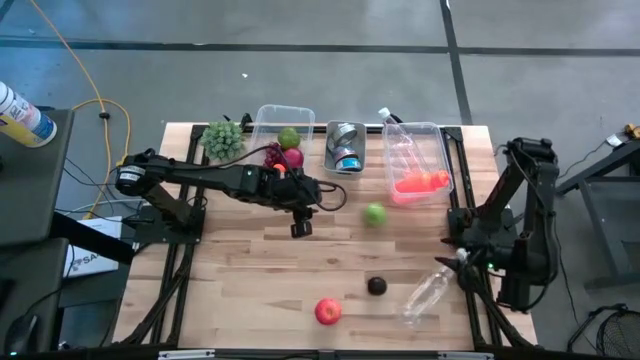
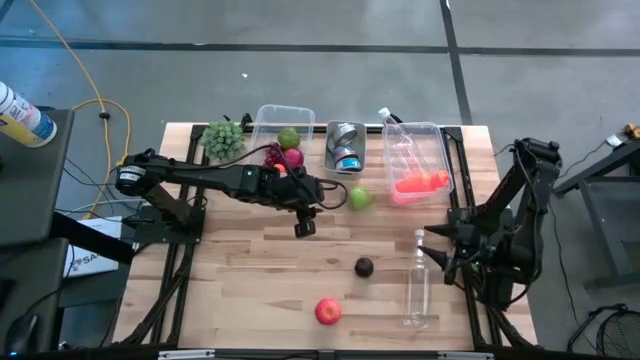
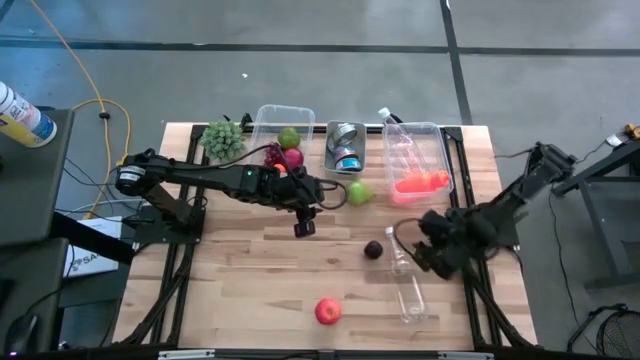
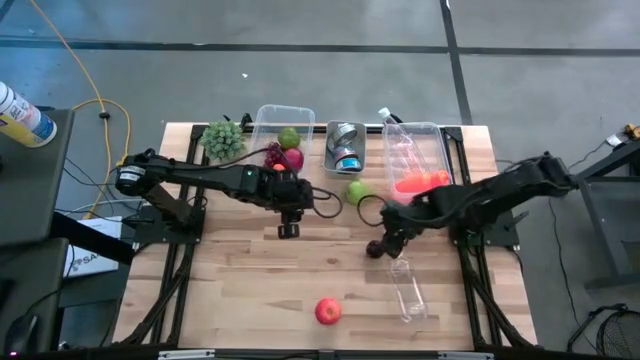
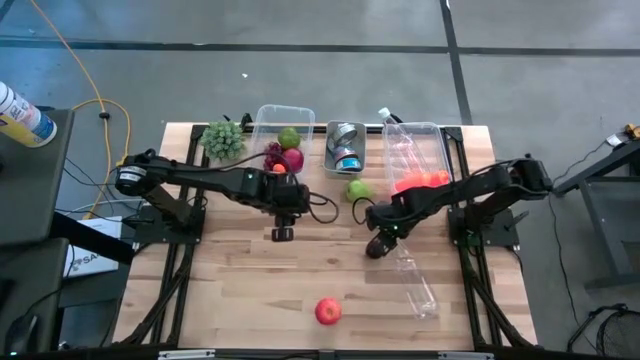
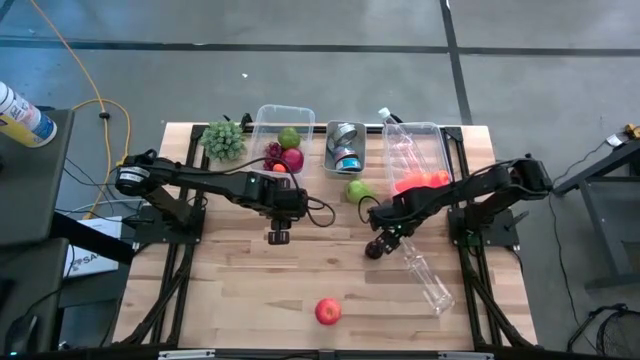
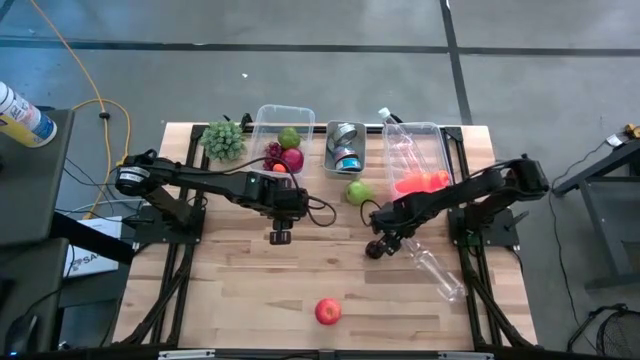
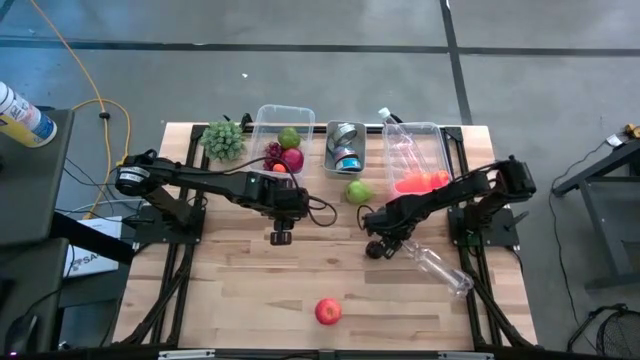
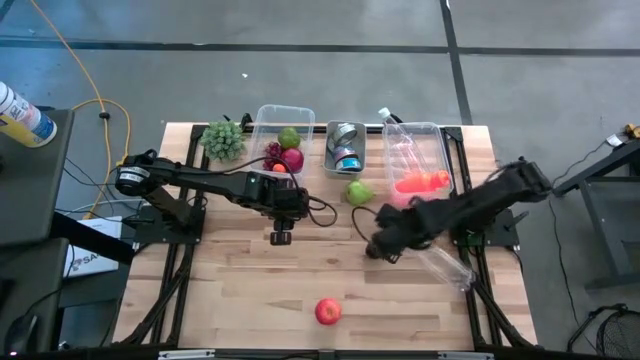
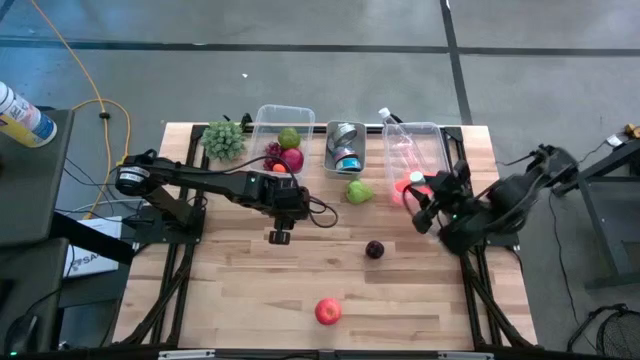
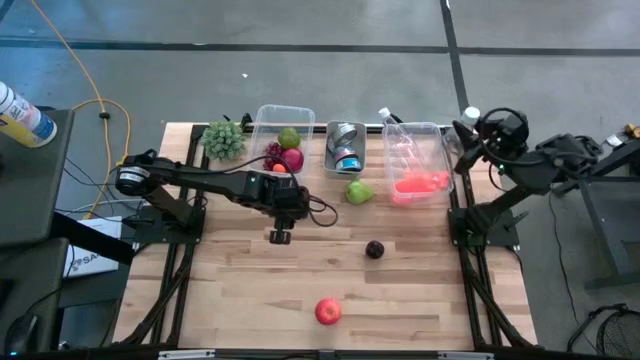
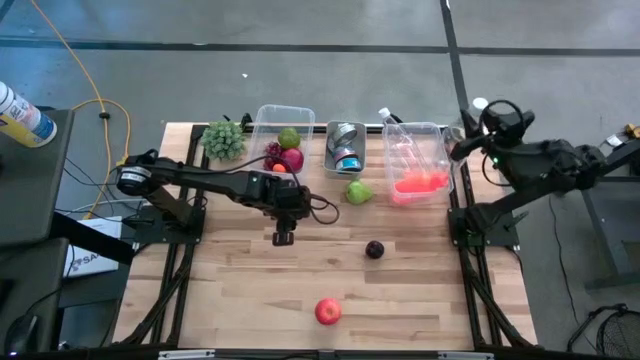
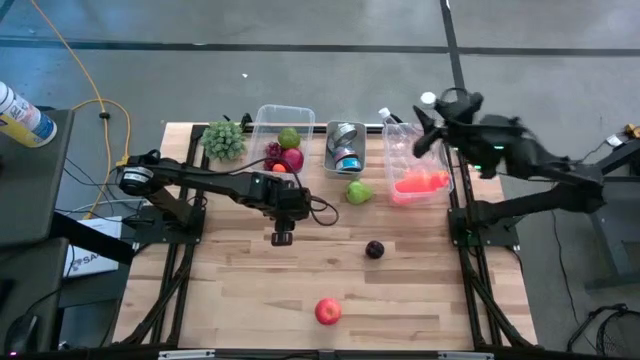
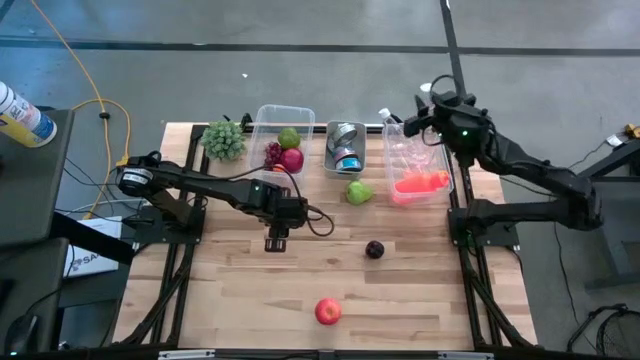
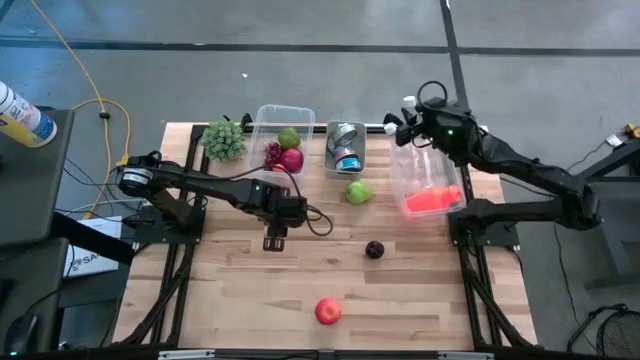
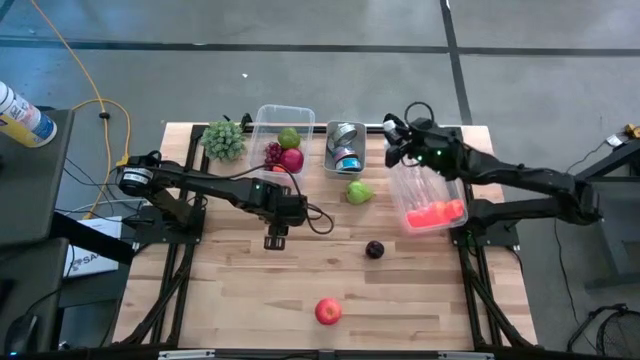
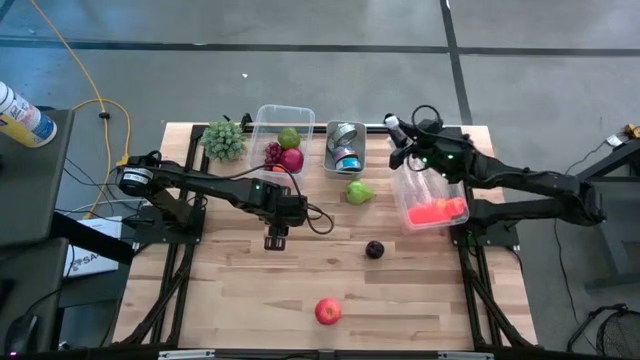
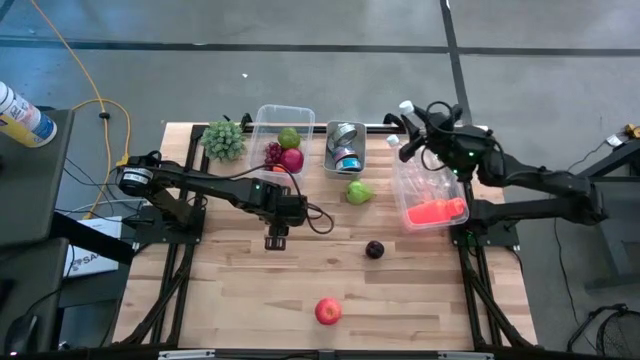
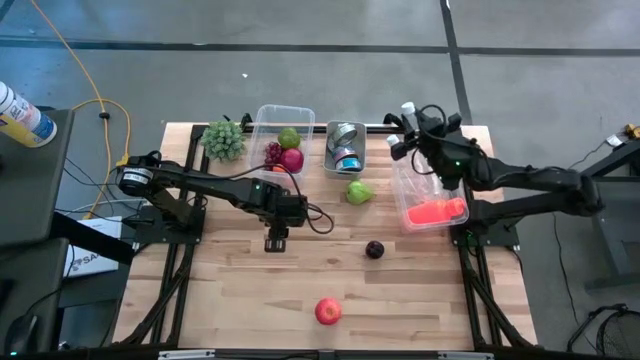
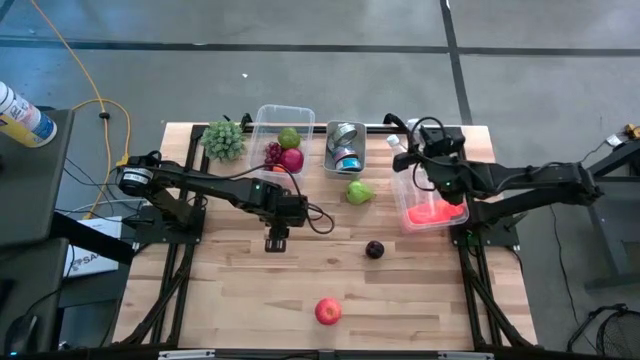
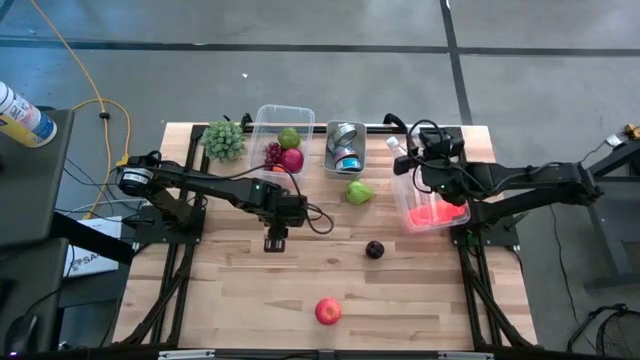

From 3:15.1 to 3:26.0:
Task: Pick & Place Food Item
Put the transparent water bottle into the right transparent bin

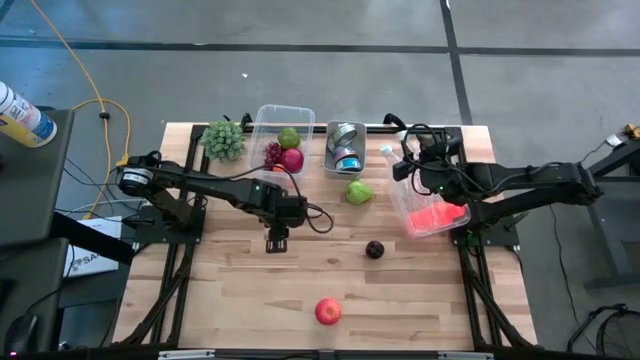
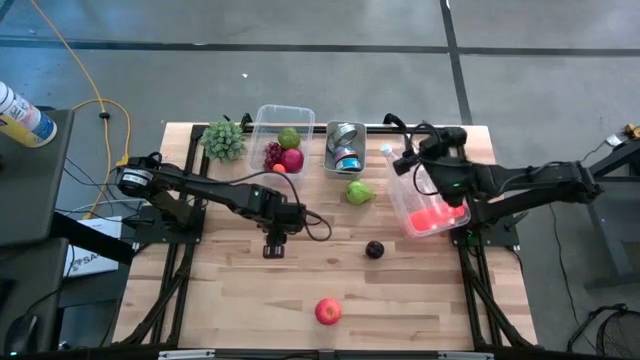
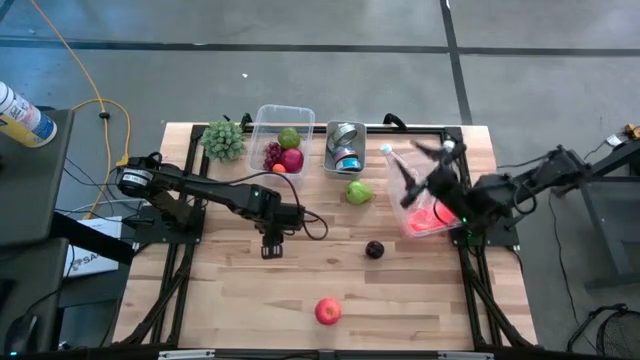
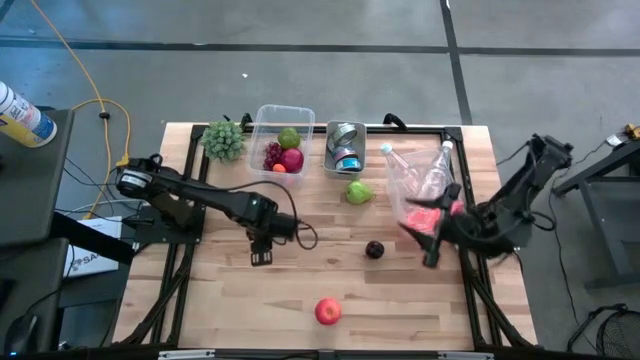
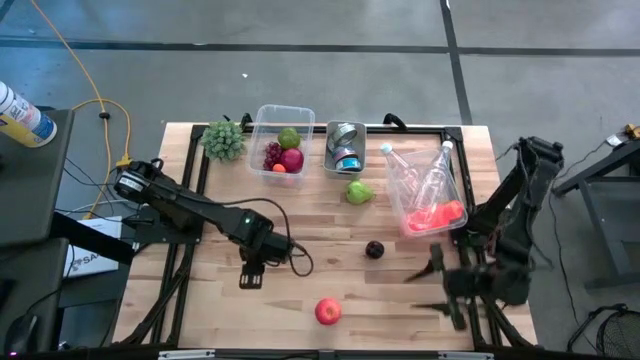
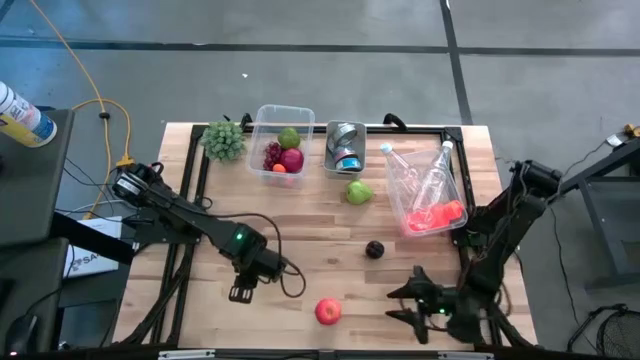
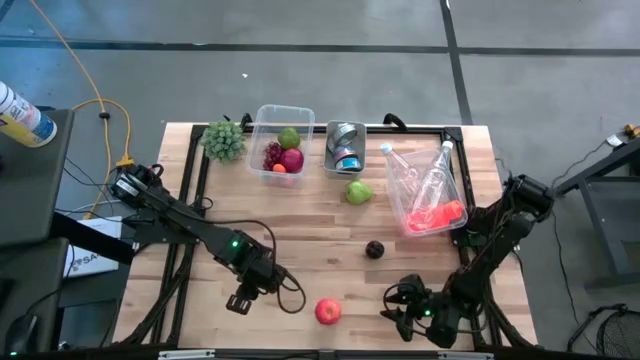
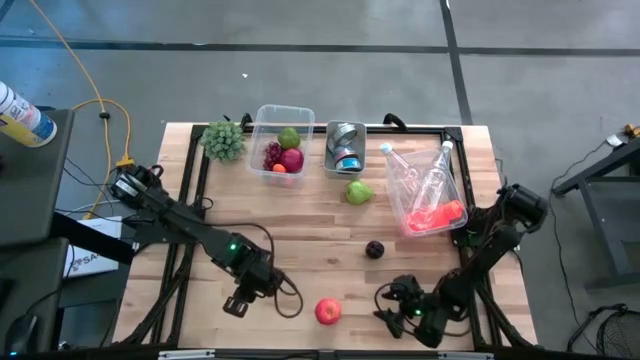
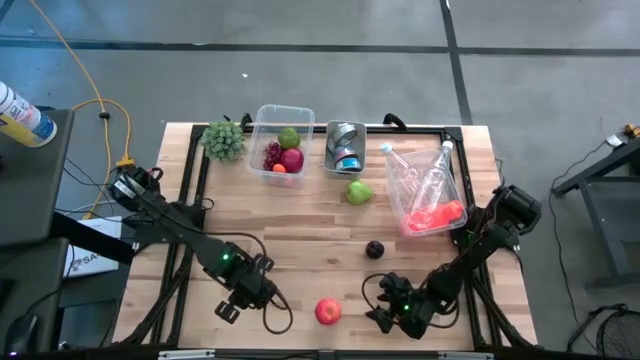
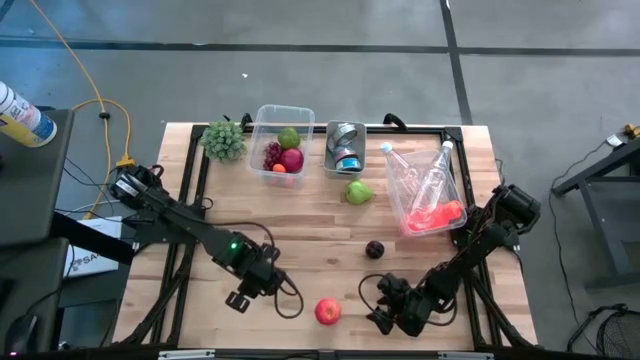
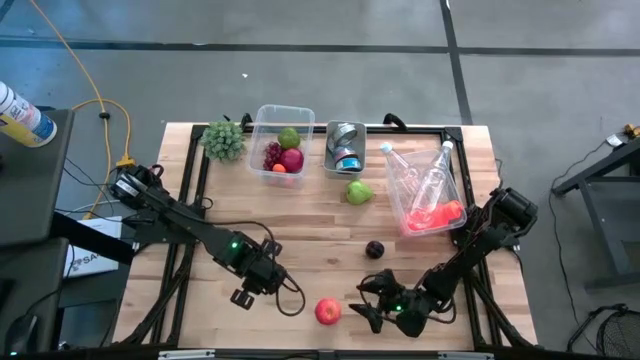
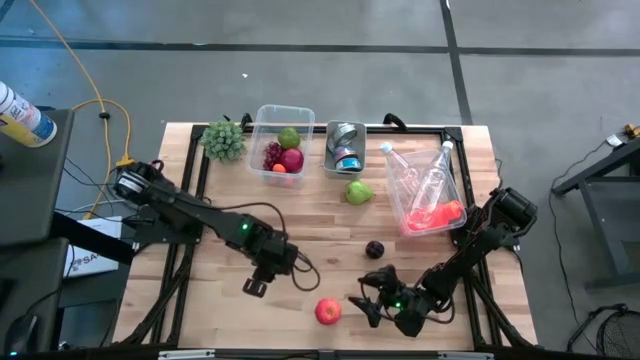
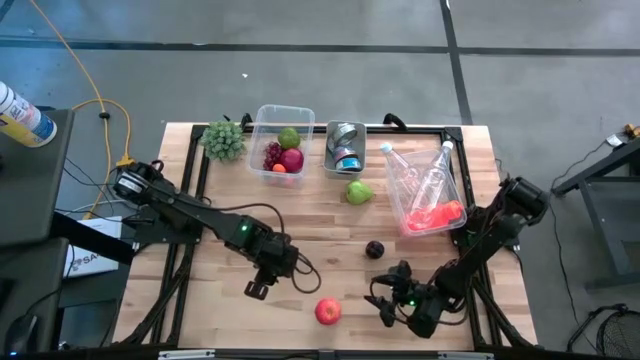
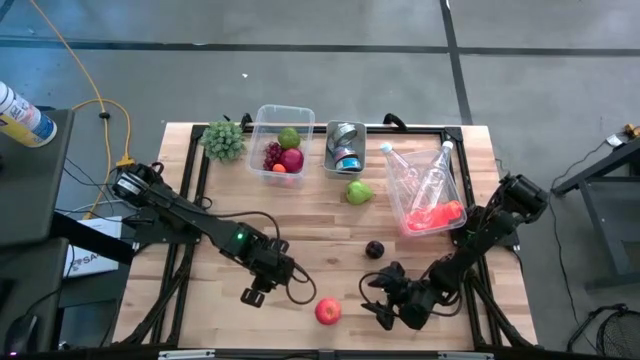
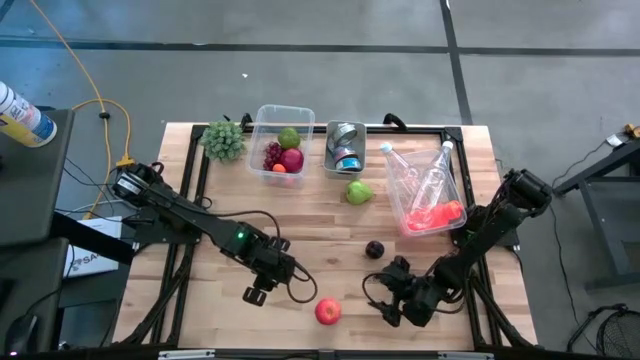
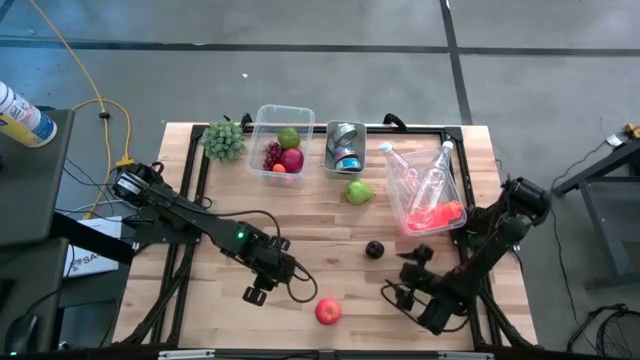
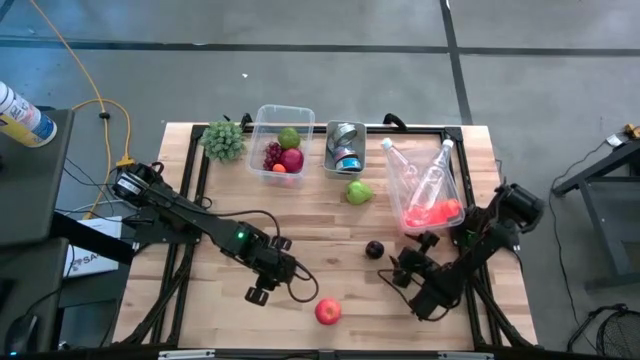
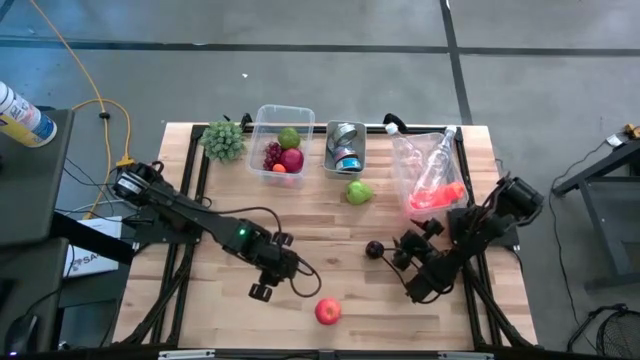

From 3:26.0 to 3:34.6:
Adjust the right transparent bin on the table
